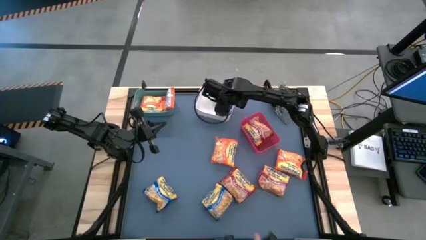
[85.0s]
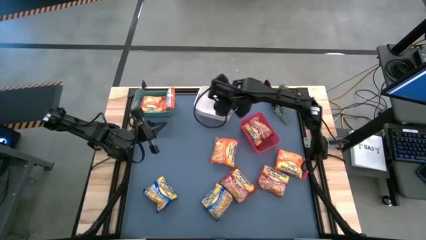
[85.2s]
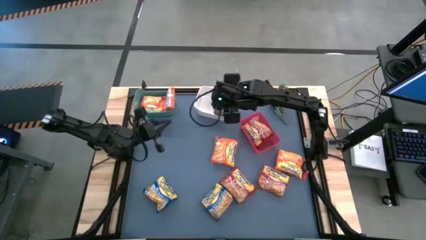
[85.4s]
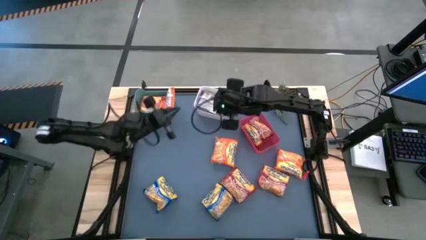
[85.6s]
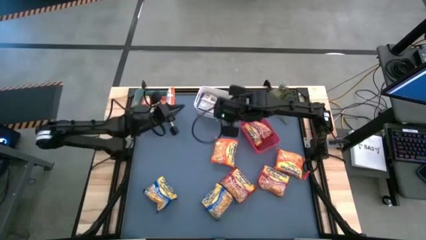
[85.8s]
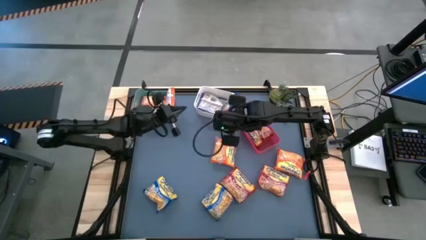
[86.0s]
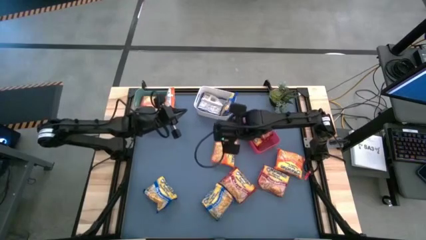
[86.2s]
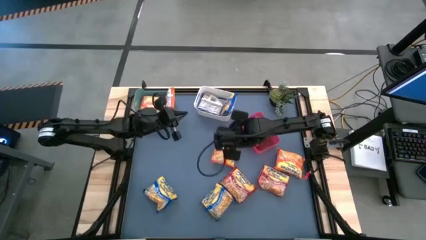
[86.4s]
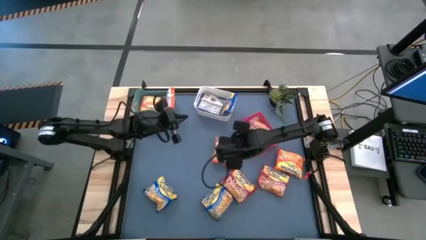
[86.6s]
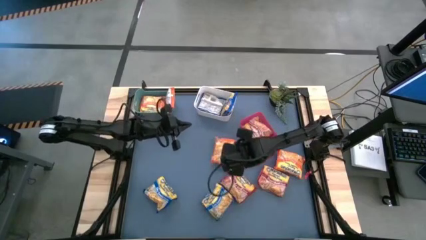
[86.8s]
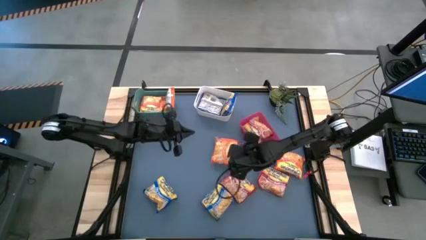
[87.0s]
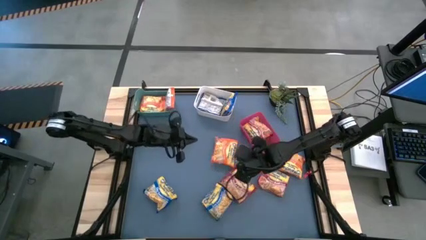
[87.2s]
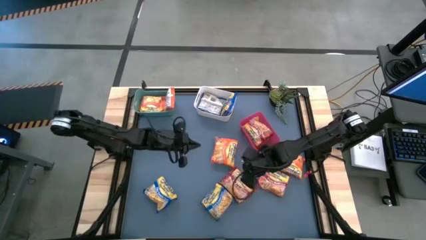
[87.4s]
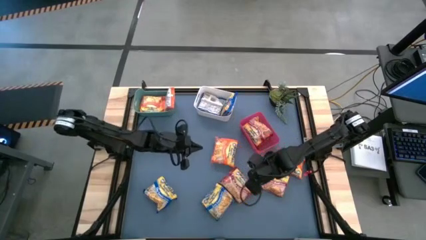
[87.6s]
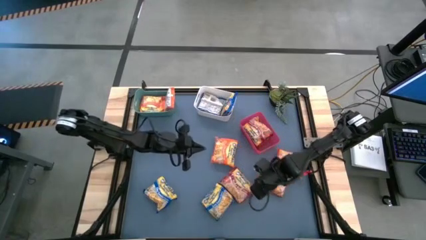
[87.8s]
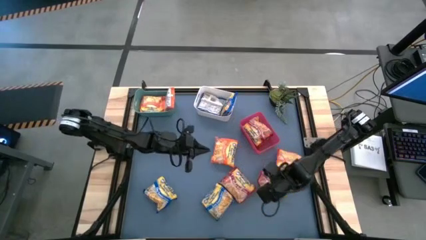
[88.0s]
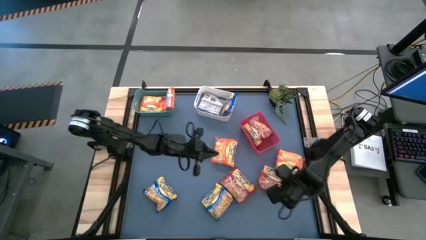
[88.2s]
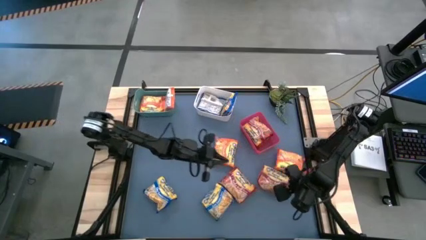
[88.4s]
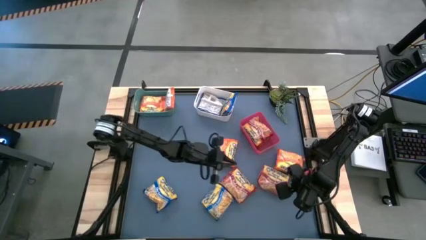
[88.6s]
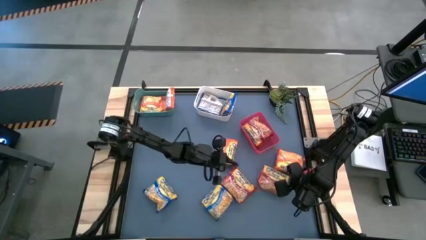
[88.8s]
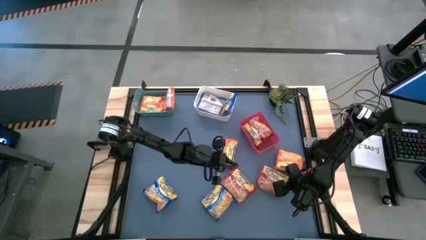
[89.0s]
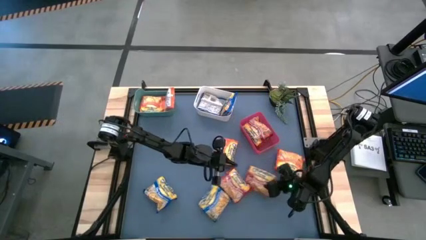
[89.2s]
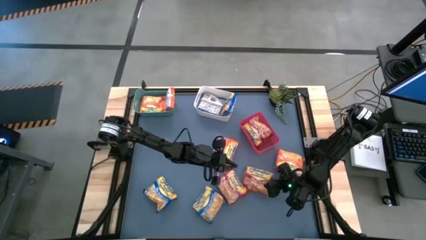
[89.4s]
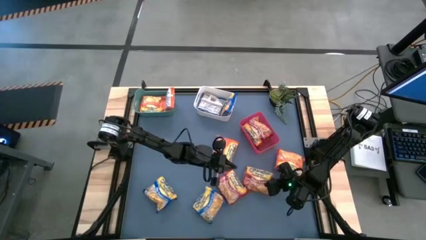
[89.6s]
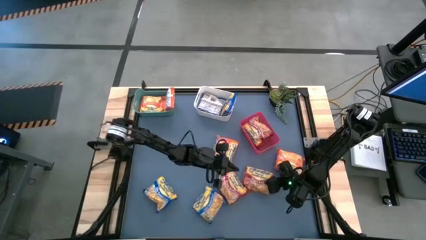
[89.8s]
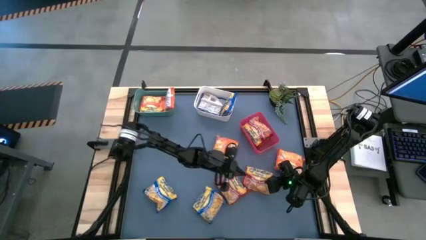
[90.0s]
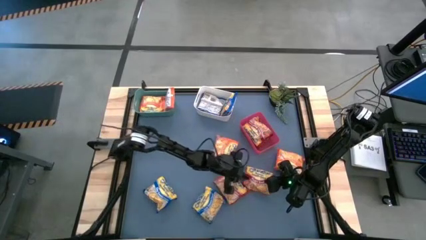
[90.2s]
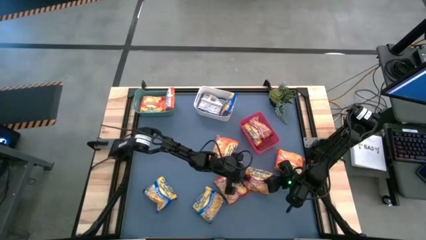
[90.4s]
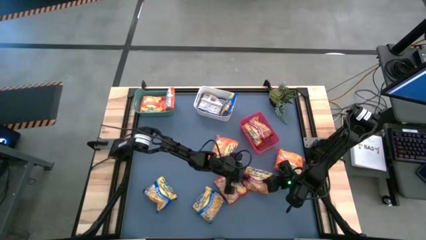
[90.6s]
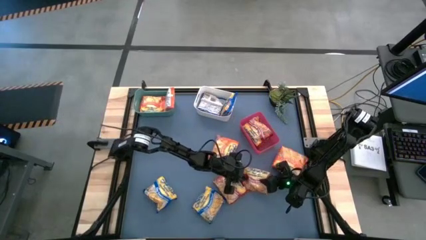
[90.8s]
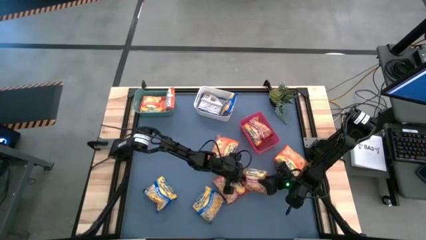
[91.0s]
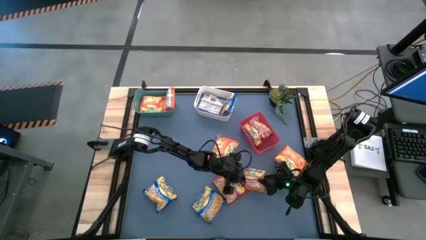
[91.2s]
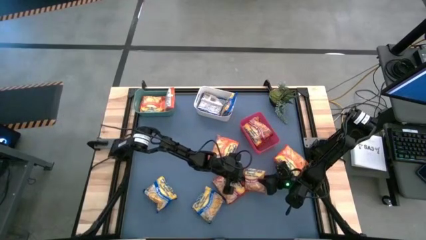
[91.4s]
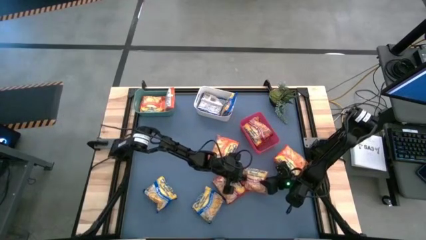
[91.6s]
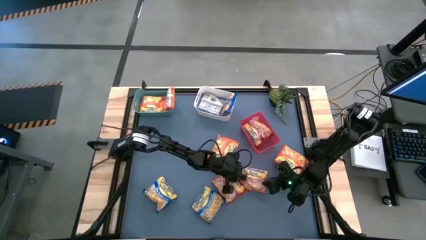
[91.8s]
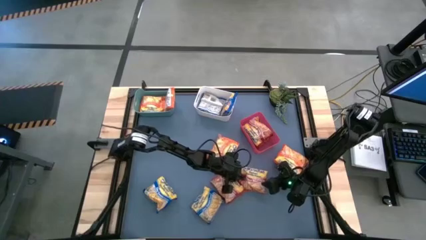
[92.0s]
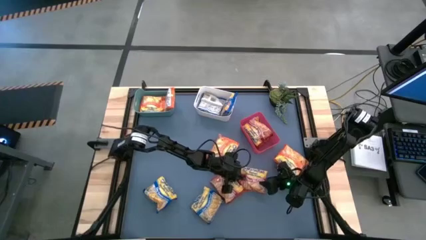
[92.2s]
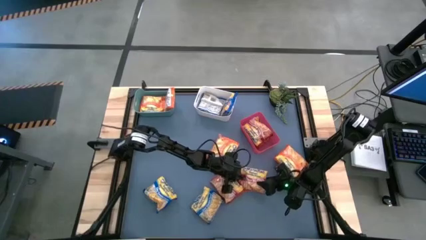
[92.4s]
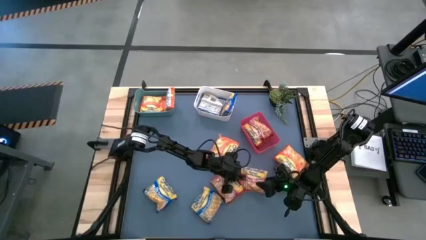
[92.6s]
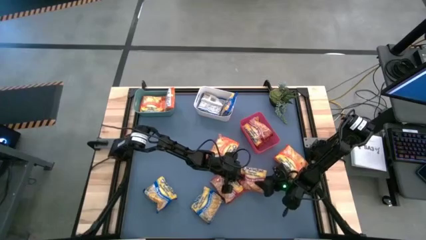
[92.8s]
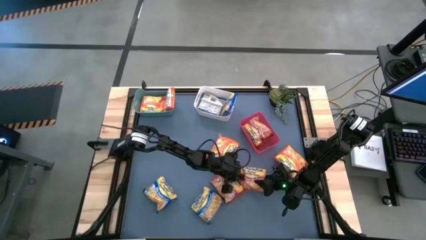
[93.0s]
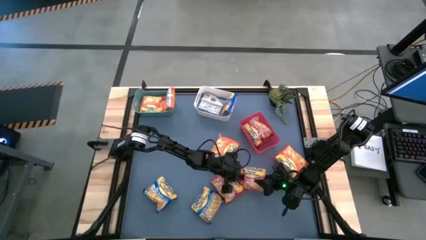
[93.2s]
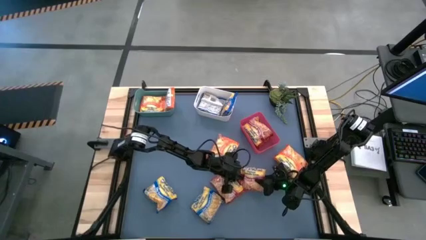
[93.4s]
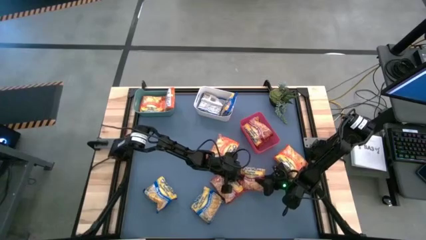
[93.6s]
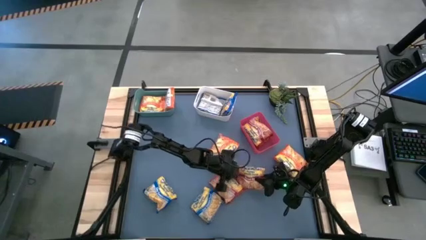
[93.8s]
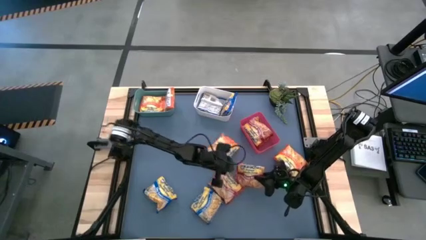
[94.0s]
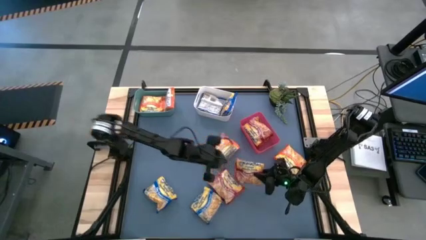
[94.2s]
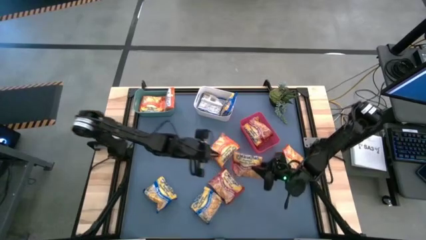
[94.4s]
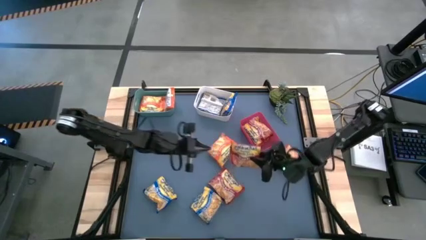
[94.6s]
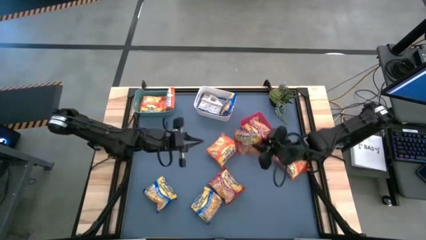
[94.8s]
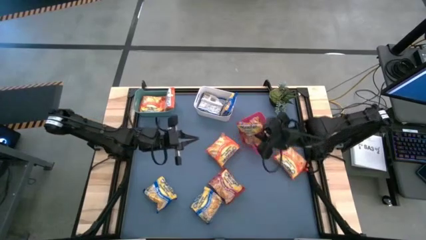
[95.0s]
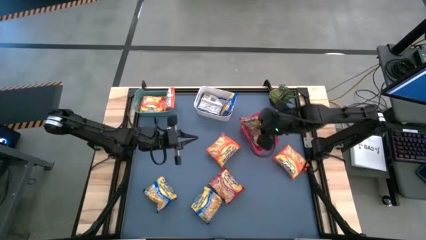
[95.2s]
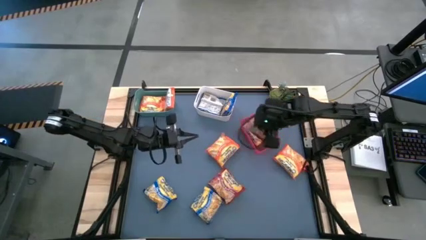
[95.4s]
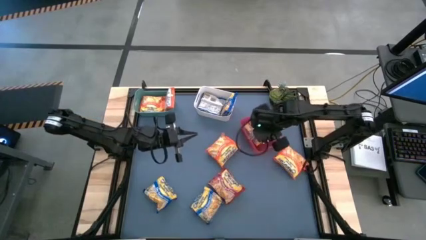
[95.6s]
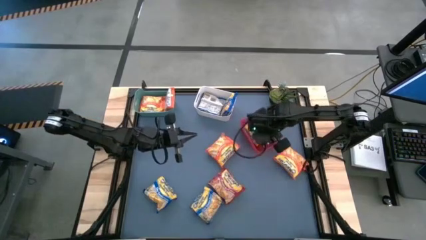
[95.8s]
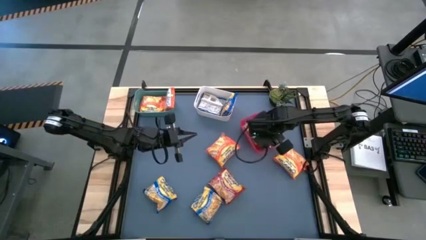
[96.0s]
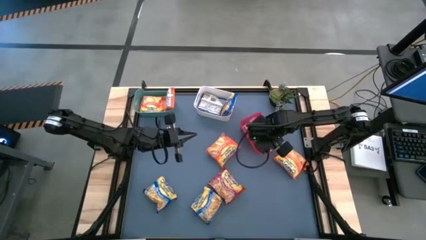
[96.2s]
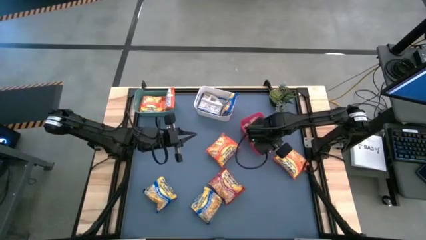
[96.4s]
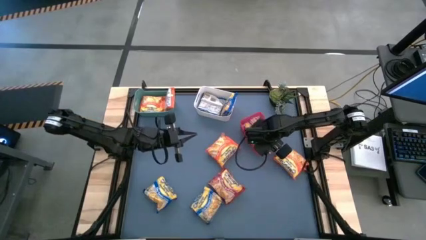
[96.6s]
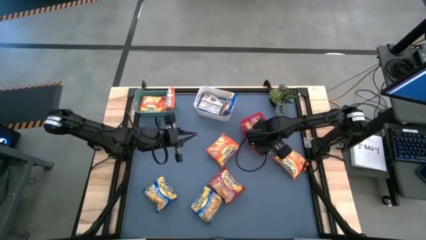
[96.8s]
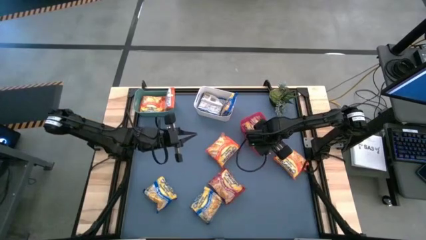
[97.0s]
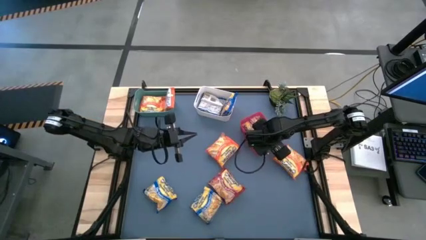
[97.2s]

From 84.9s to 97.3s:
Task: Sort Maruchan noodles
Put the red noodle pack into the pink bin

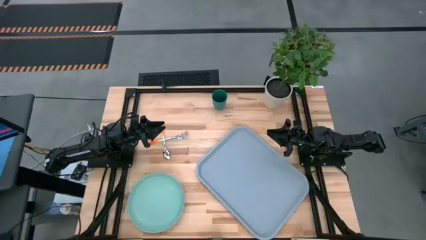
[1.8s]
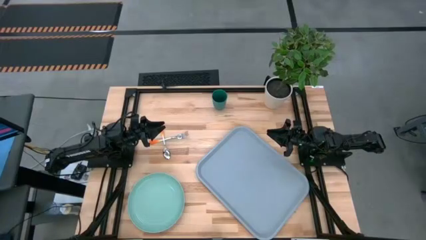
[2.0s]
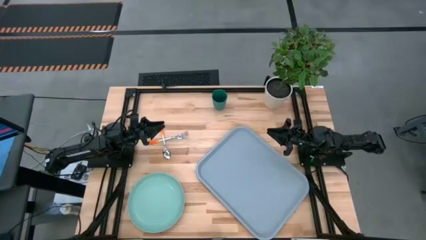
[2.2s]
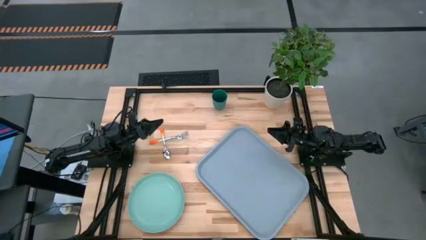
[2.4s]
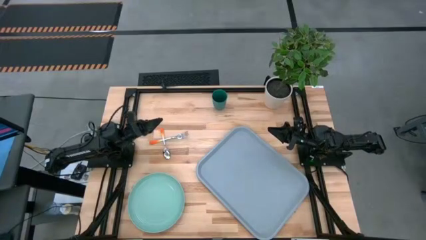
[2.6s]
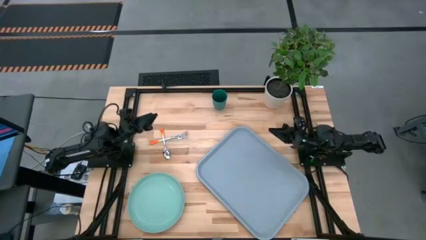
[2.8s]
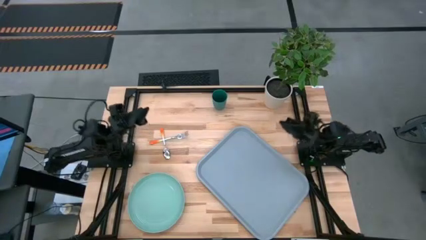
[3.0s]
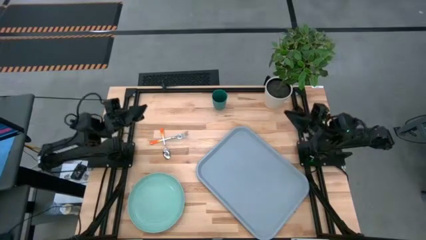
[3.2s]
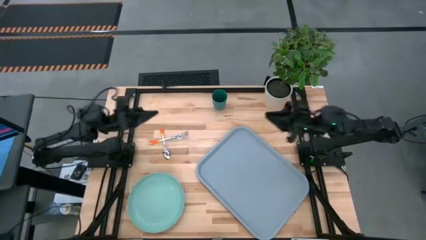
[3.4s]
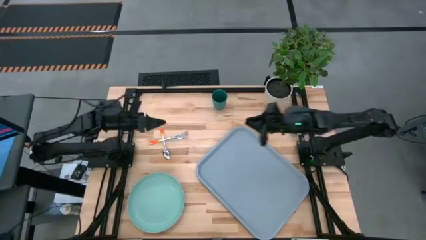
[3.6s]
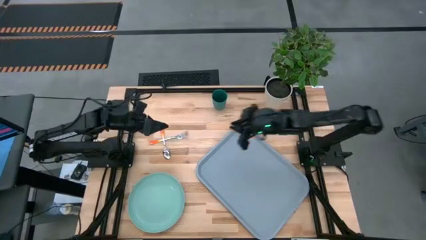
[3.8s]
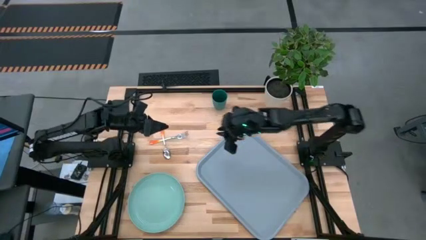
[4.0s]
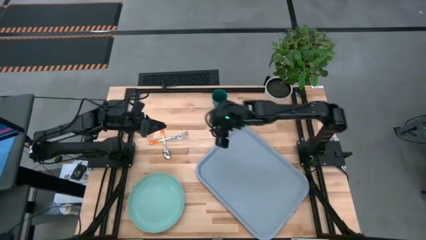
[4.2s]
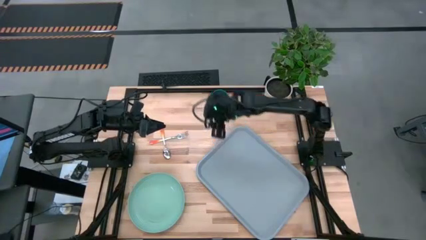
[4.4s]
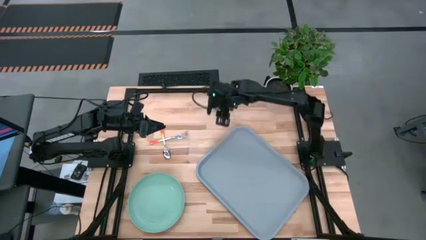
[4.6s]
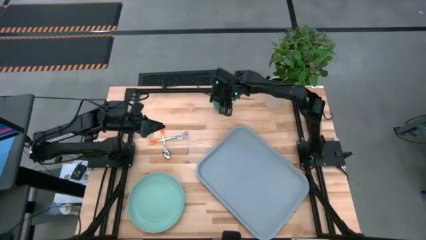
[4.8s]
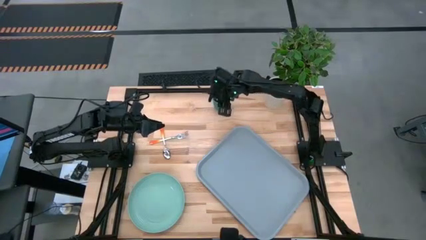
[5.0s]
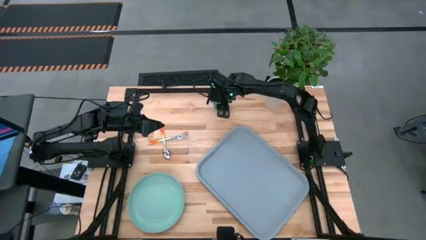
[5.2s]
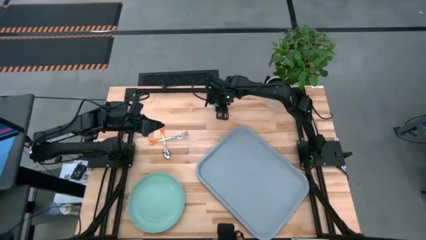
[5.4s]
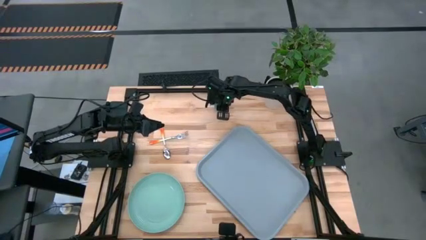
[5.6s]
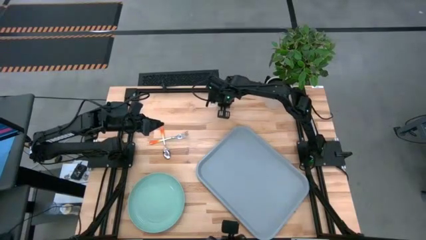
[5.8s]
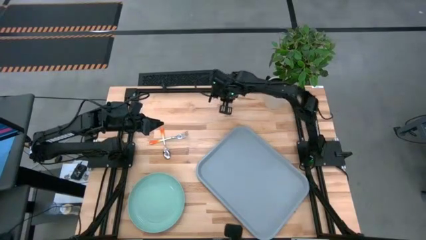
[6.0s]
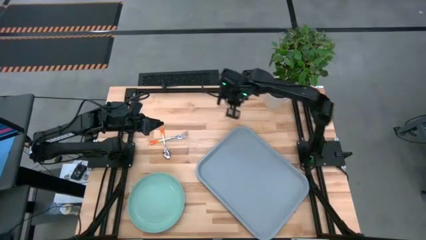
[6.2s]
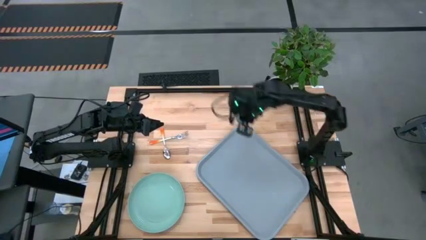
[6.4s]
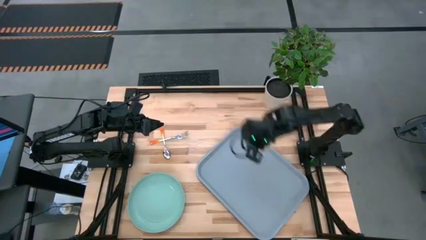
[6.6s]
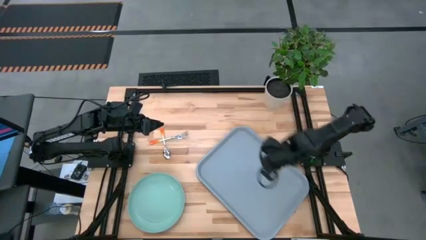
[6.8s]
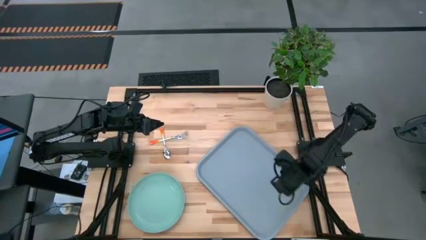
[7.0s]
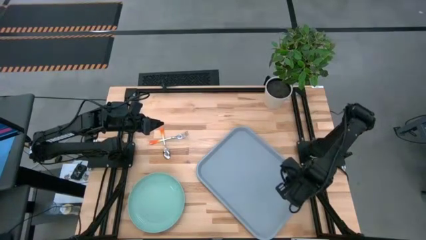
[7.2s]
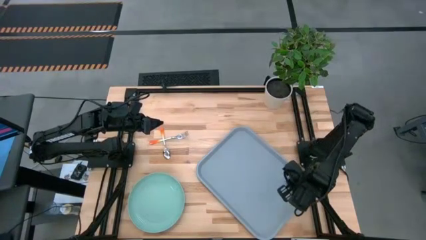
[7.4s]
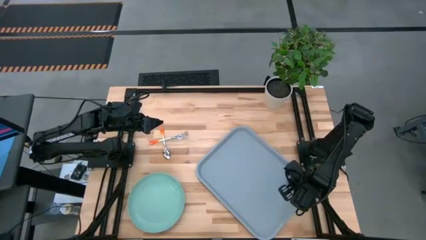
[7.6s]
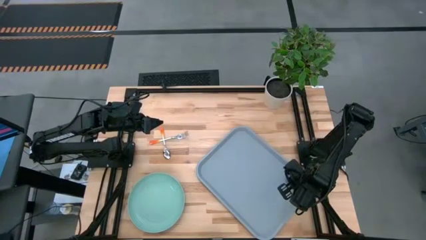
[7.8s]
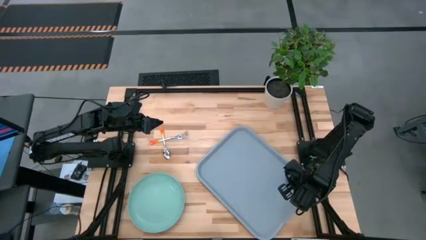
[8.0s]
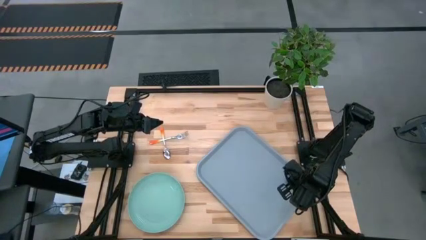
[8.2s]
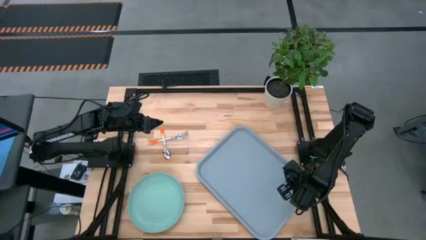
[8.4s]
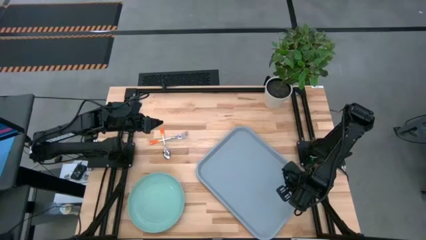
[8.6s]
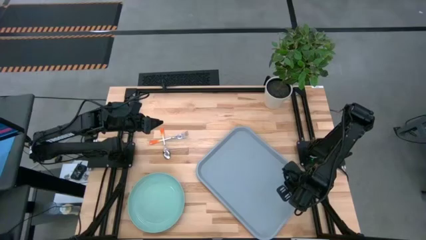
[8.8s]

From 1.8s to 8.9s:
Task: Pick and place plate/cup/fork/spoon on tray
Put the green cup on the blue tray
